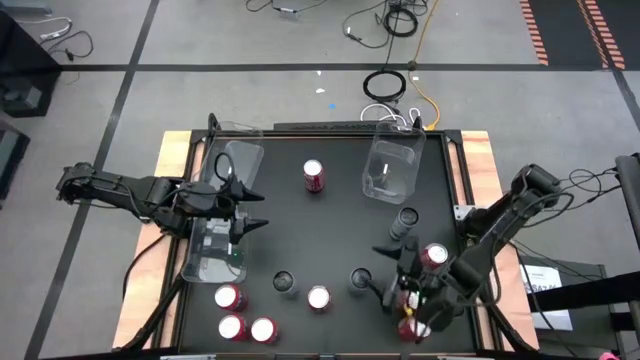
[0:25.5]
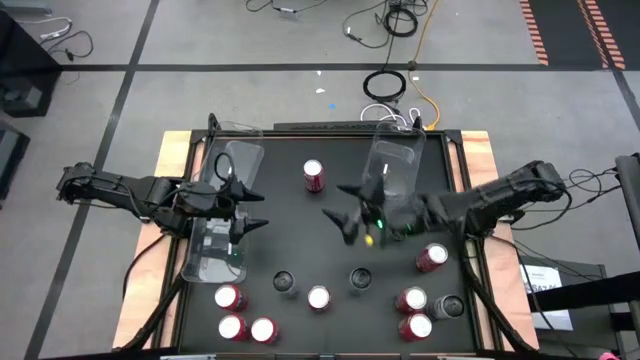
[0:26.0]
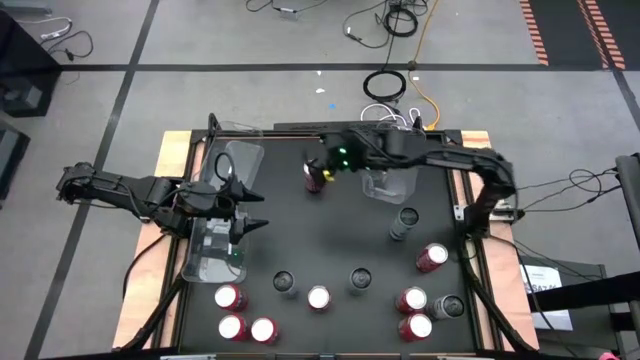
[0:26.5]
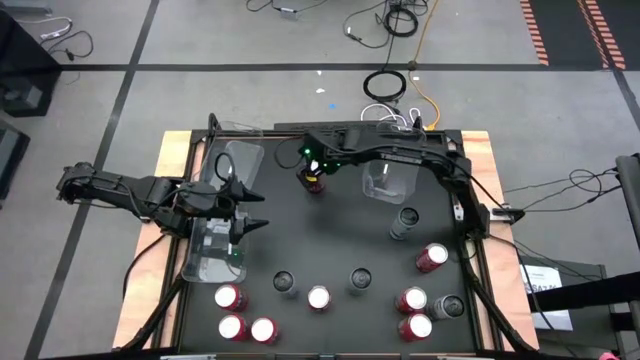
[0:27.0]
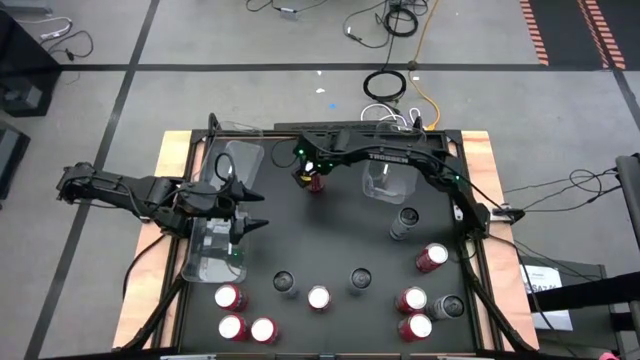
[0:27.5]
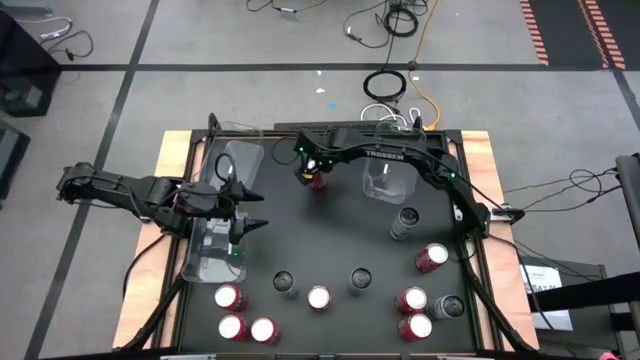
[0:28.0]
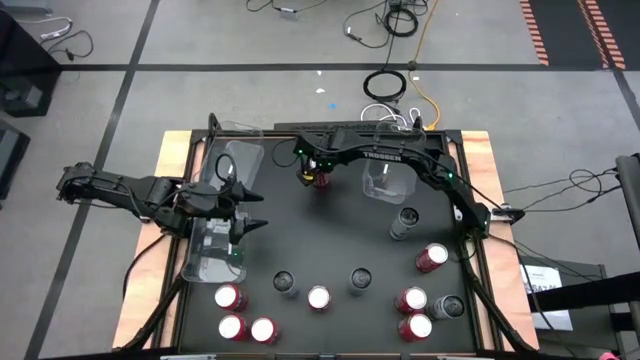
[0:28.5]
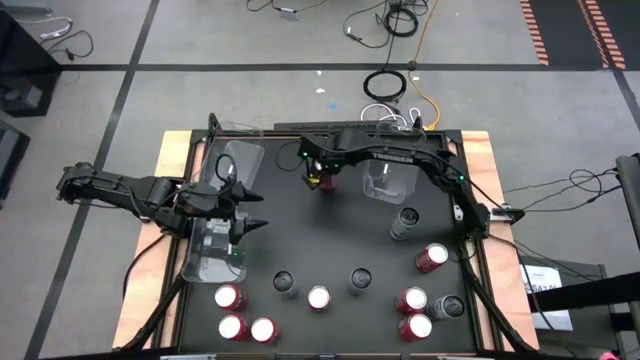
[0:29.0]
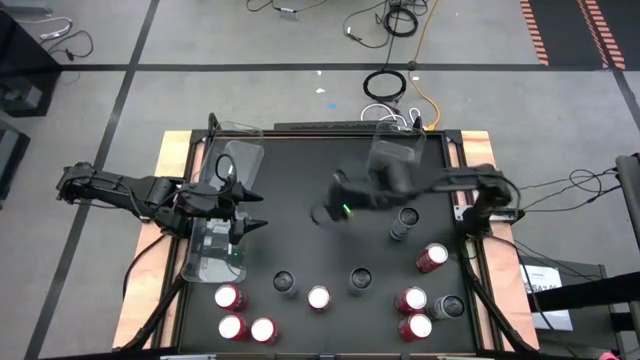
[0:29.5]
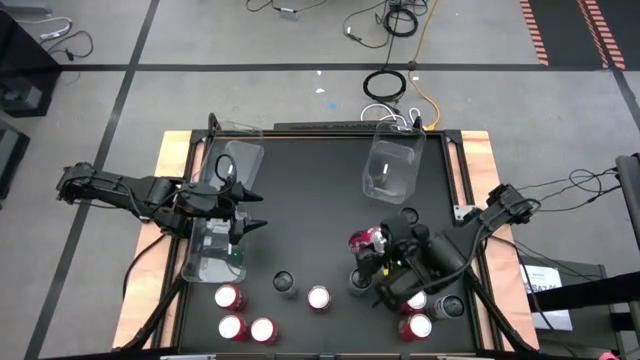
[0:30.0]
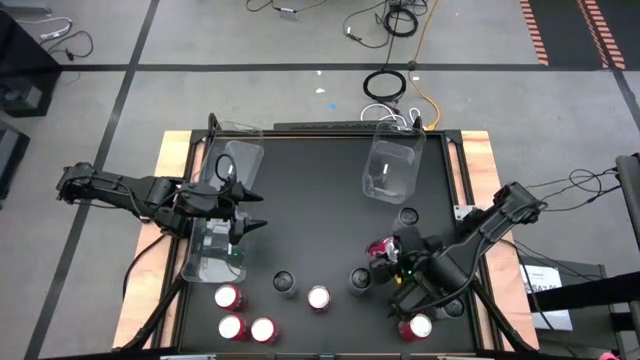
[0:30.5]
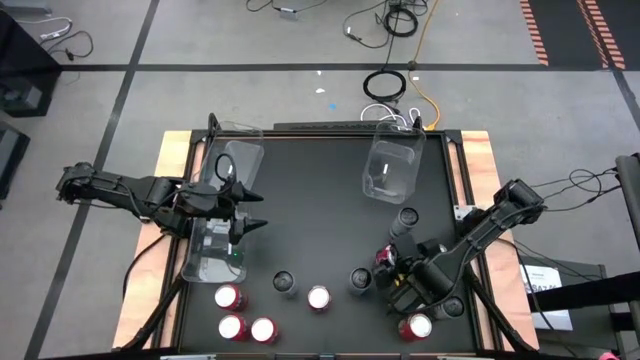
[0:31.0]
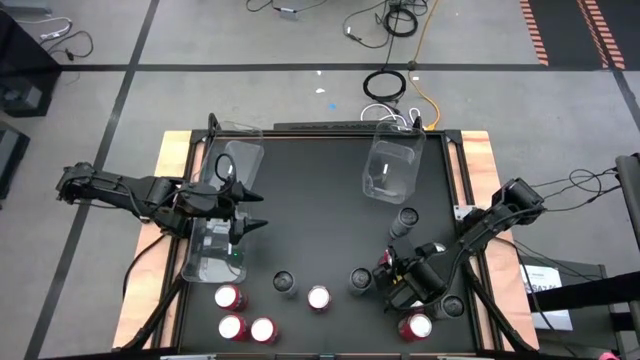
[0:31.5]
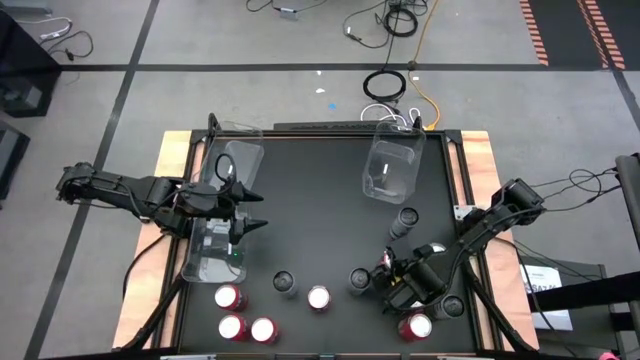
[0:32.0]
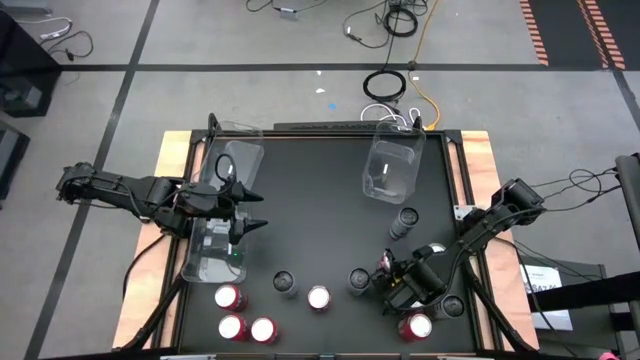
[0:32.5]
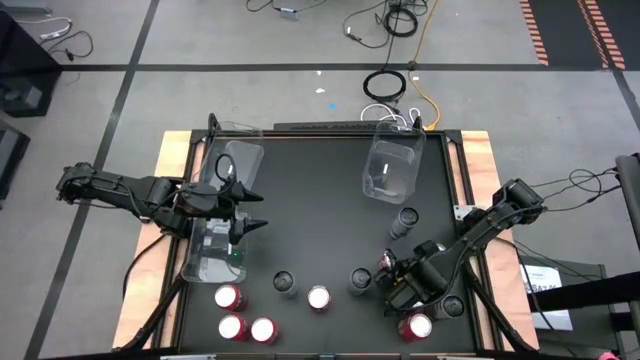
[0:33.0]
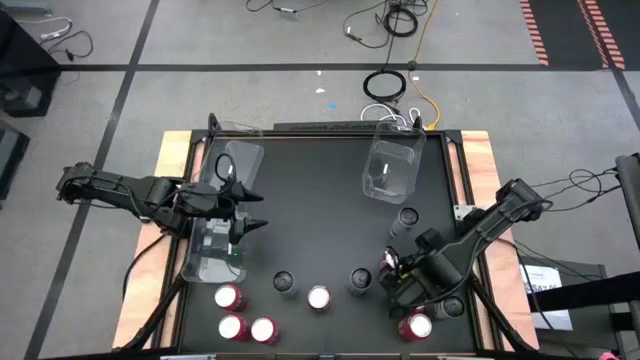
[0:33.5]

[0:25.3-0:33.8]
Task: Sort soda cans
Move the top red soda can to the middle right of the table

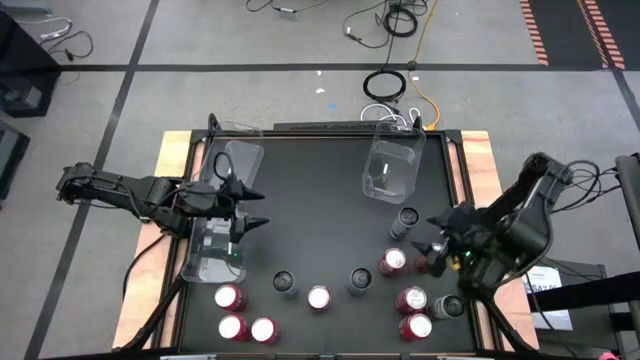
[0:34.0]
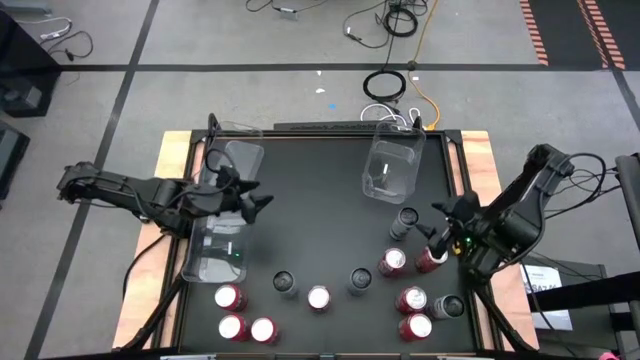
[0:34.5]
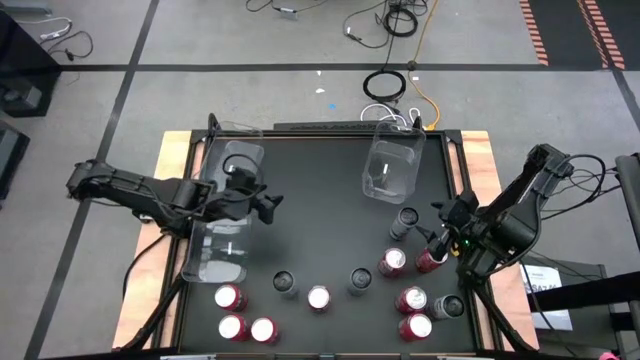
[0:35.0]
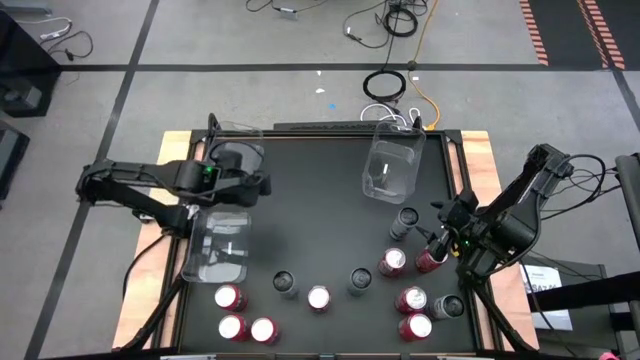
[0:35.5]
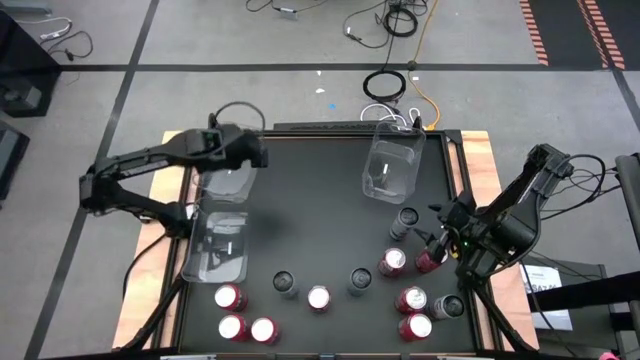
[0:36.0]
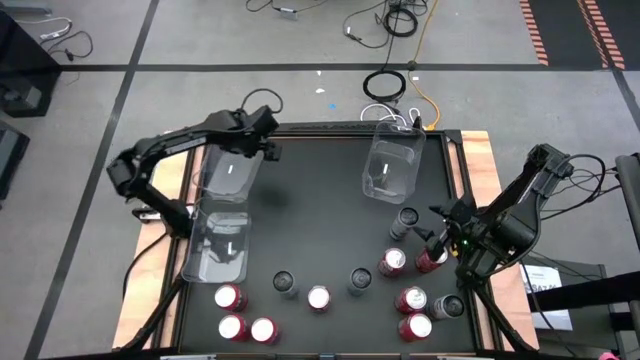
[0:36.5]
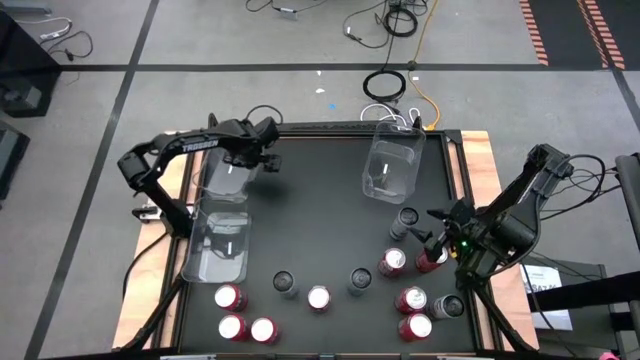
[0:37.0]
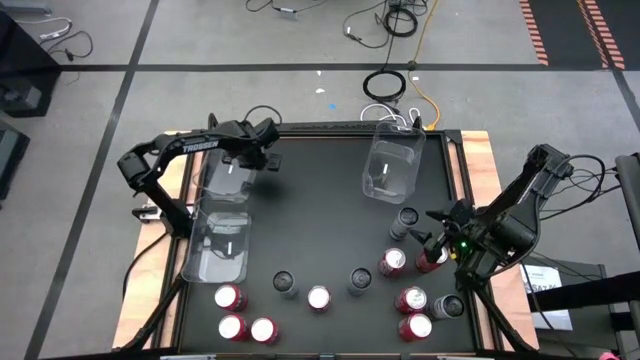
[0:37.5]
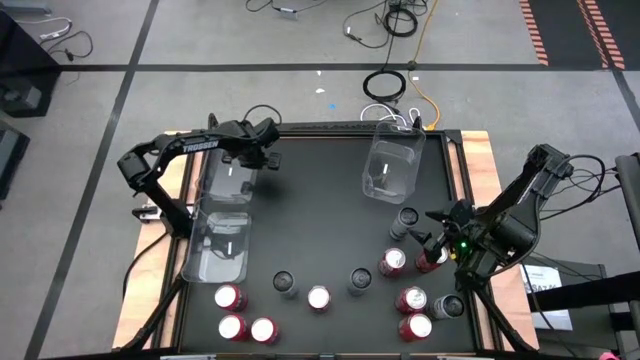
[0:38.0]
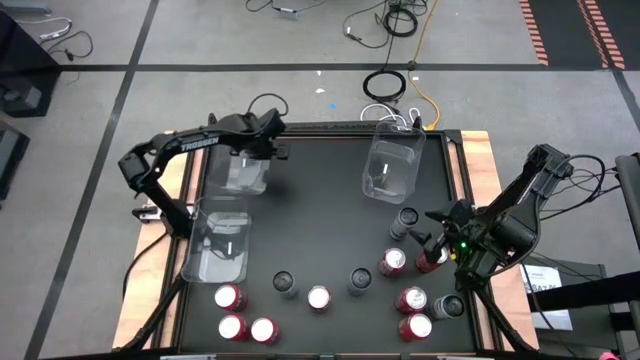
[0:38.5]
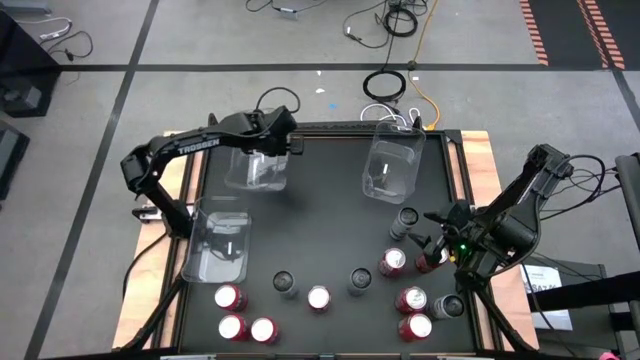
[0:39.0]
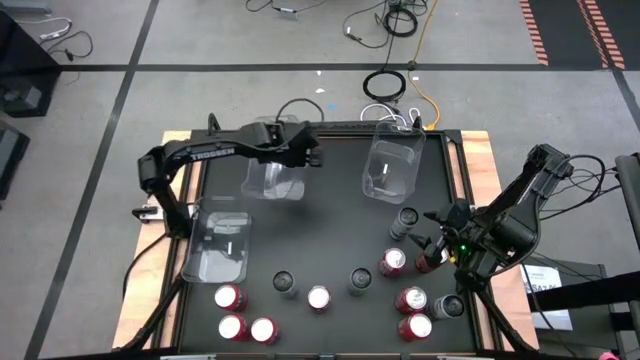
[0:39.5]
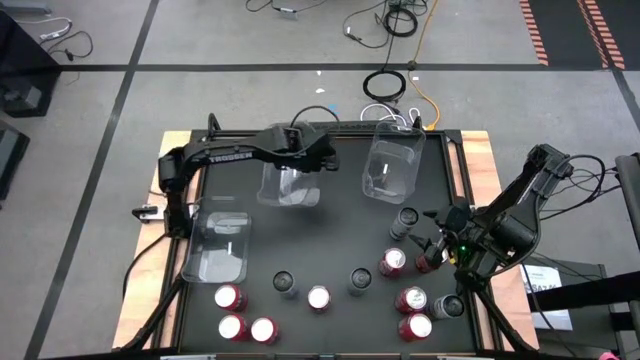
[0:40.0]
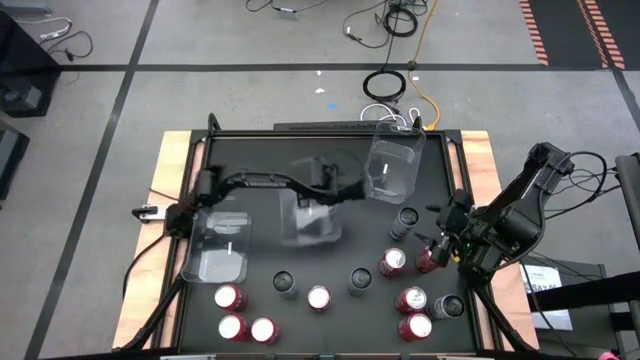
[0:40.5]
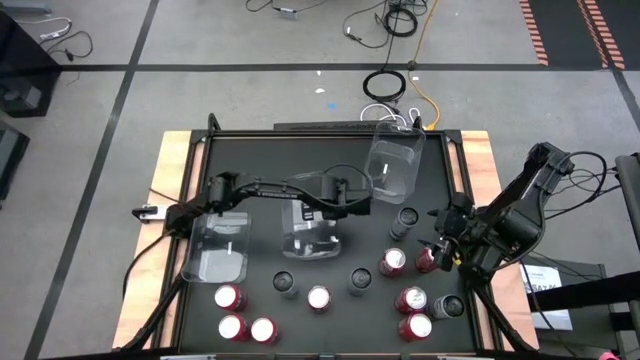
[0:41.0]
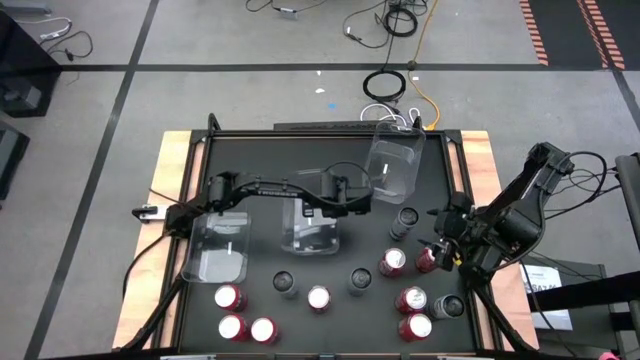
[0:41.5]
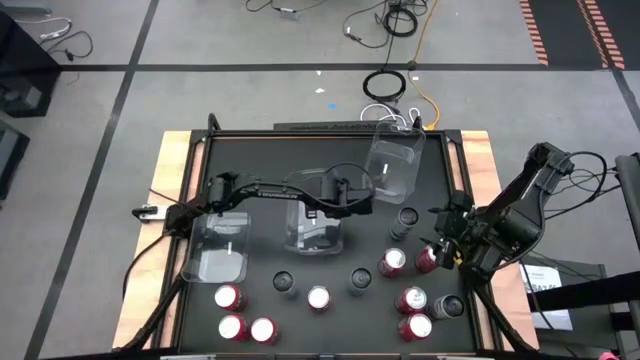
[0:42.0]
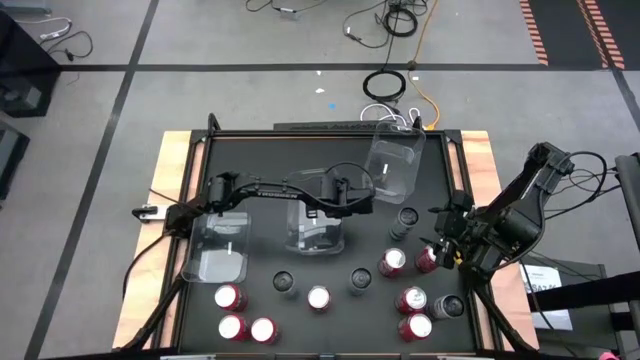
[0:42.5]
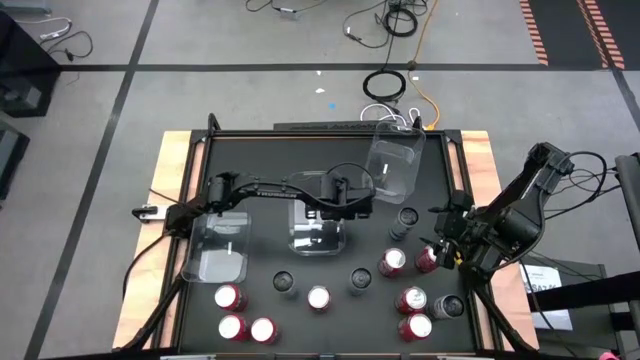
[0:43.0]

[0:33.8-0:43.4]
Move the top left transparent bin to the center of the table

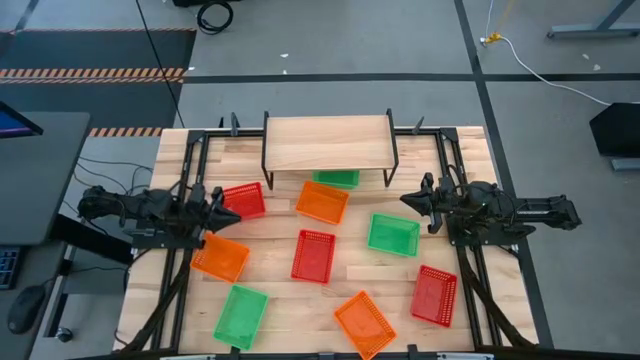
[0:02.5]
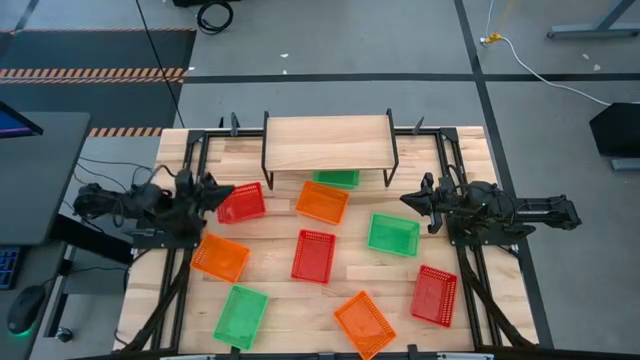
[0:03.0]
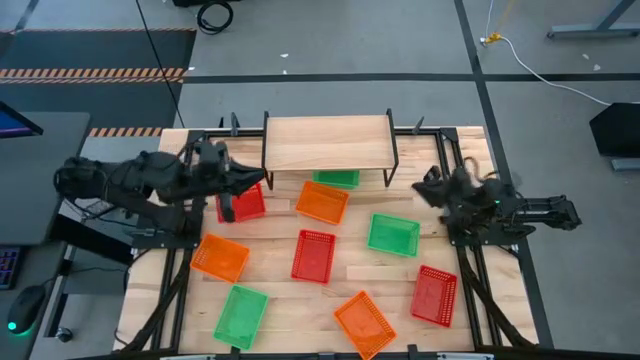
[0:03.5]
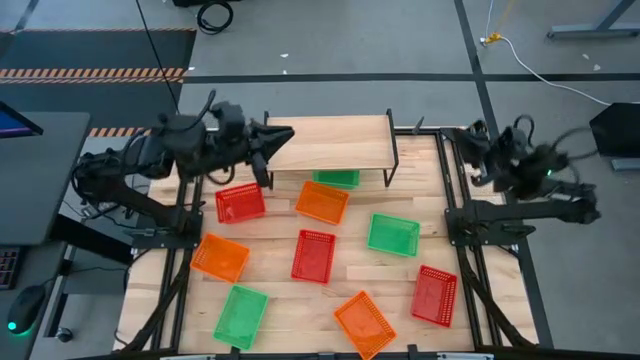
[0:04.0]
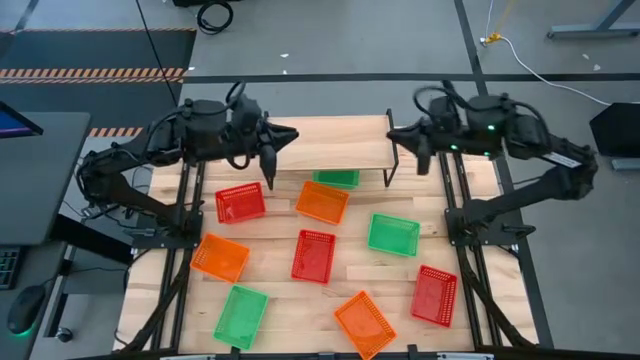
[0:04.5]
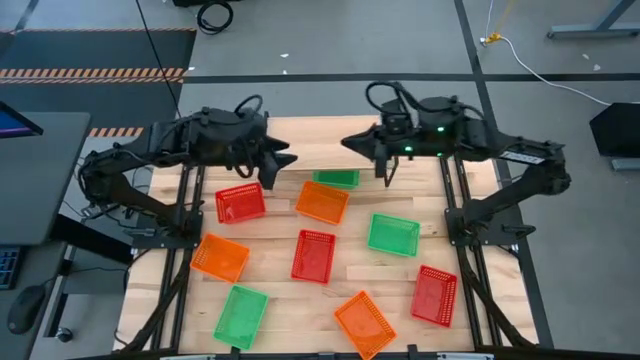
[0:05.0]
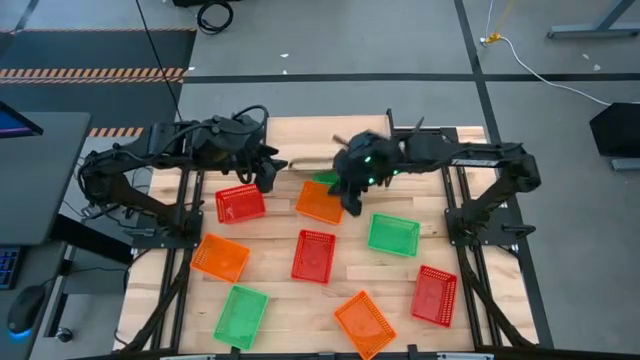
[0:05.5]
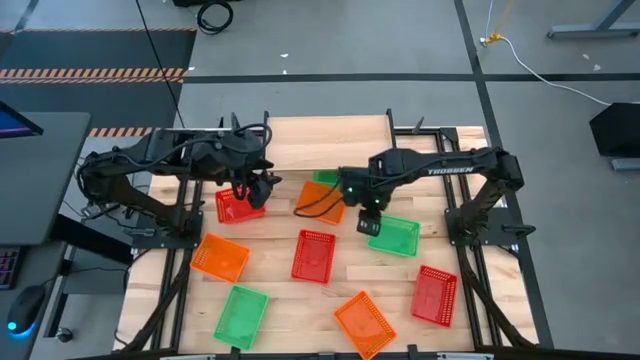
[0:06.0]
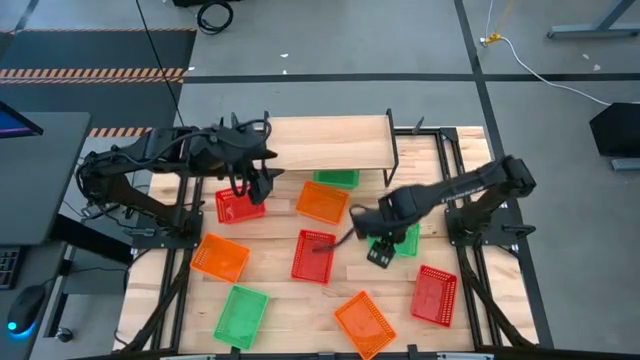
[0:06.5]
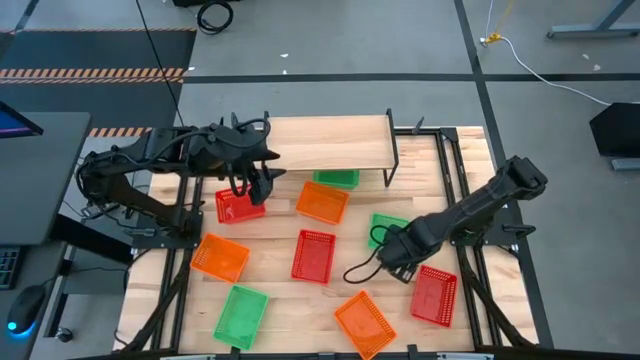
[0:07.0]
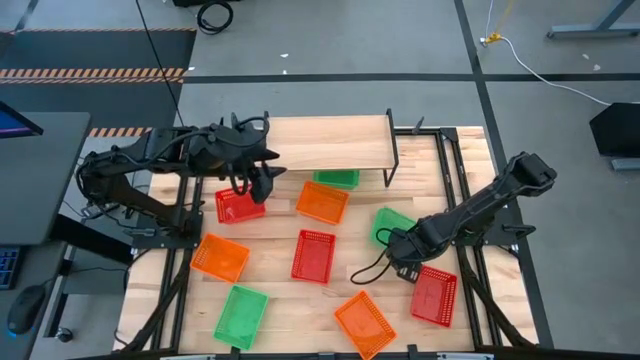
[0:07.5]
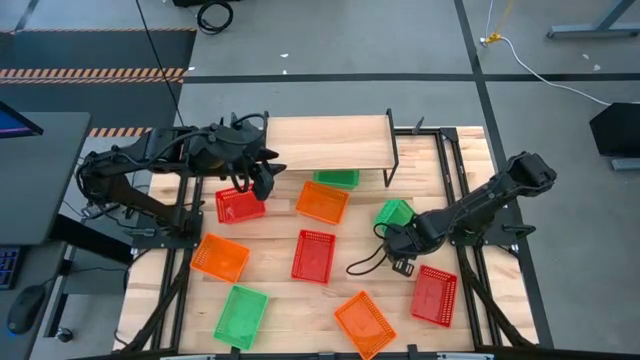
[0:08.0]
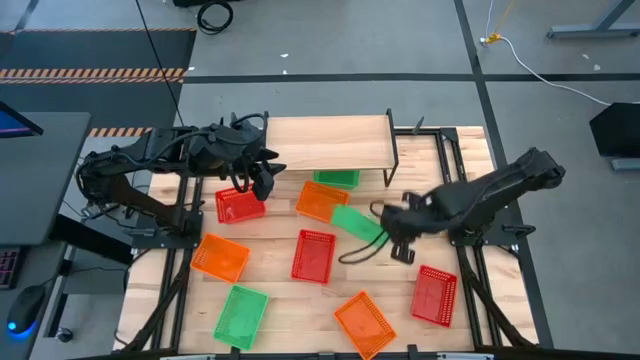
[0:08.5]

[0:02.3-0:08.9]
Task: Stack baskets on shelf by color
Put the middle green bin on the shelf
